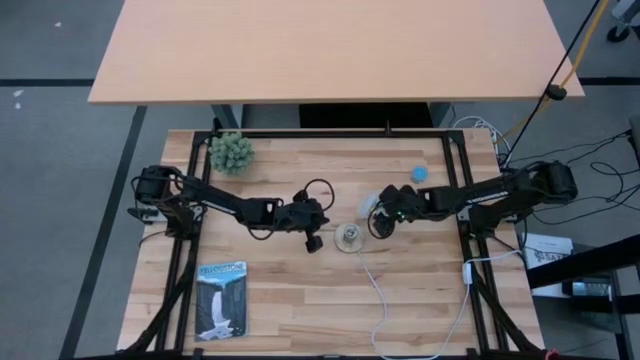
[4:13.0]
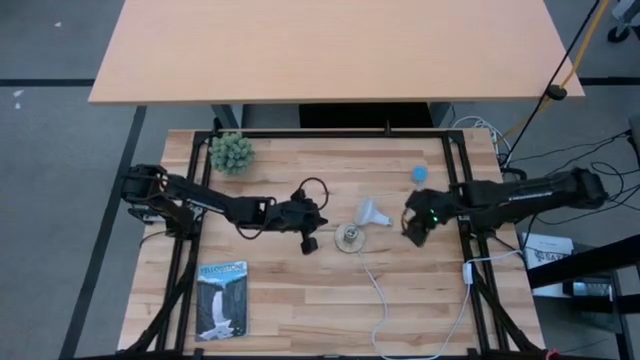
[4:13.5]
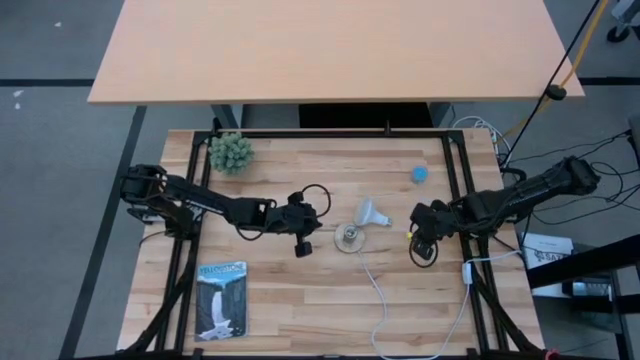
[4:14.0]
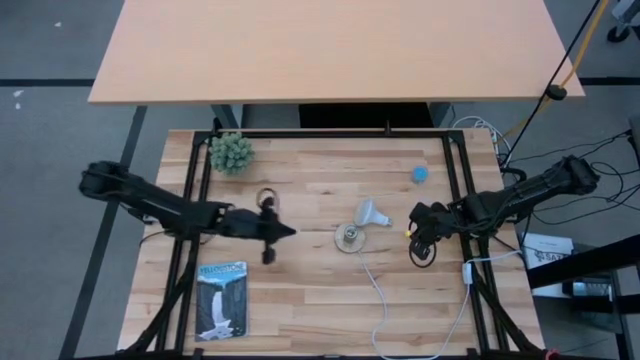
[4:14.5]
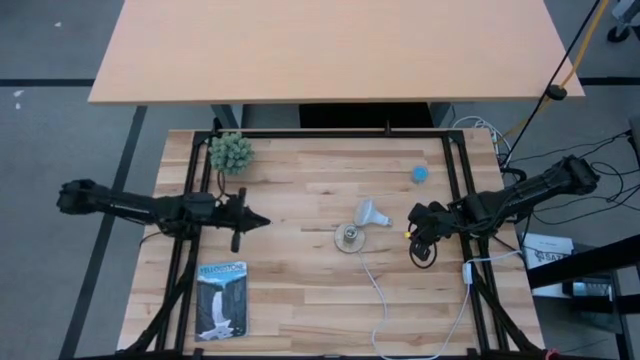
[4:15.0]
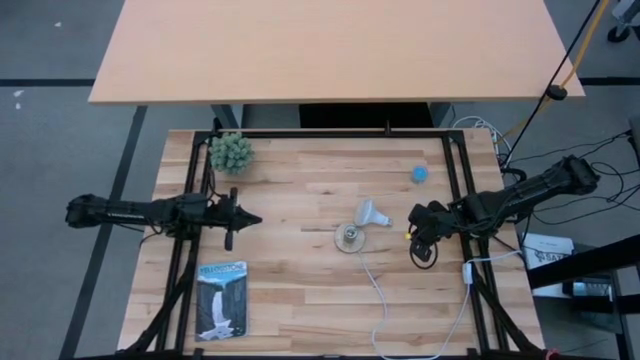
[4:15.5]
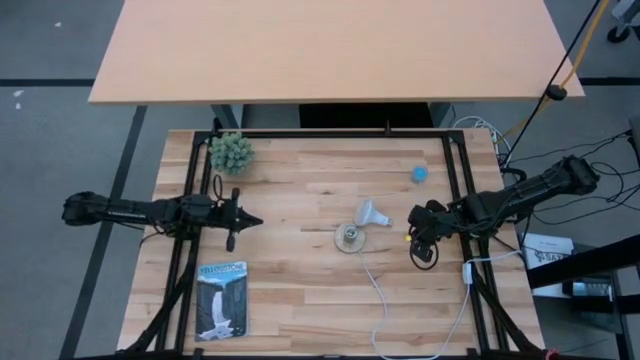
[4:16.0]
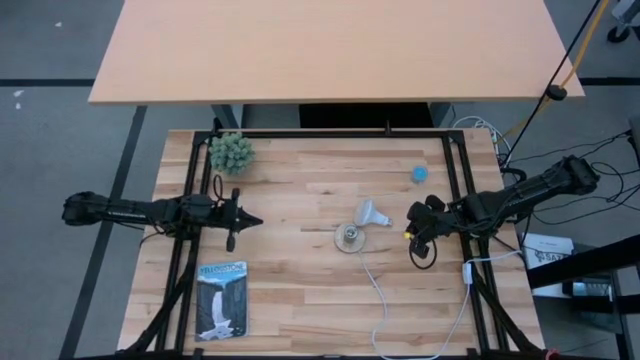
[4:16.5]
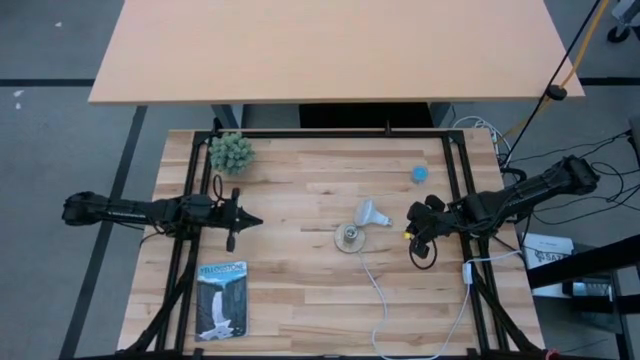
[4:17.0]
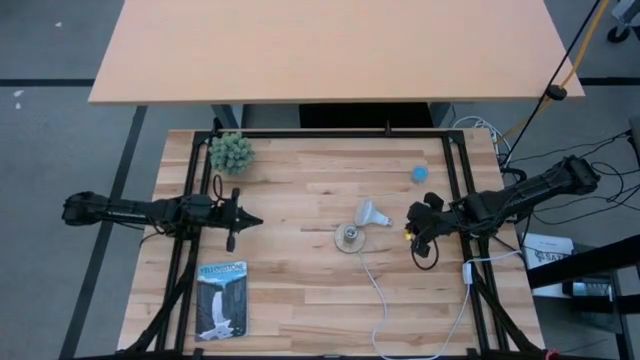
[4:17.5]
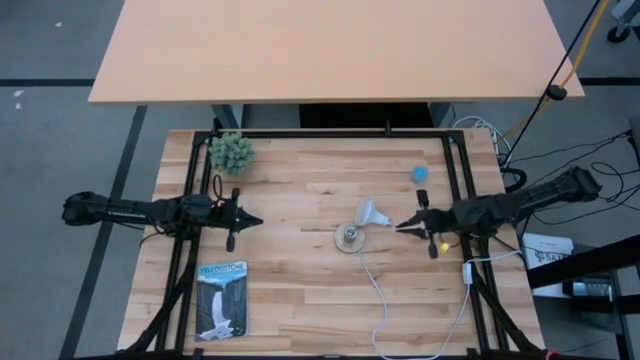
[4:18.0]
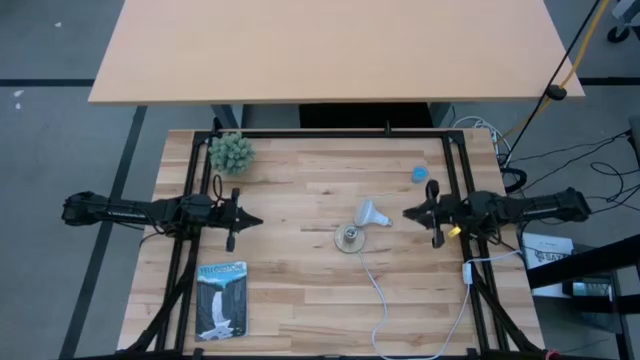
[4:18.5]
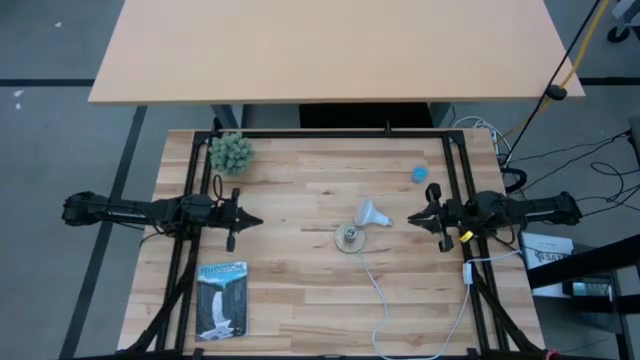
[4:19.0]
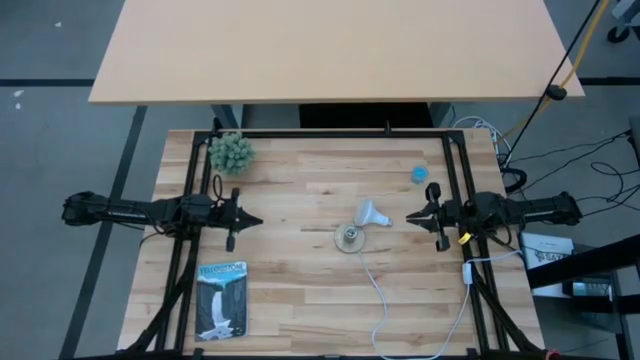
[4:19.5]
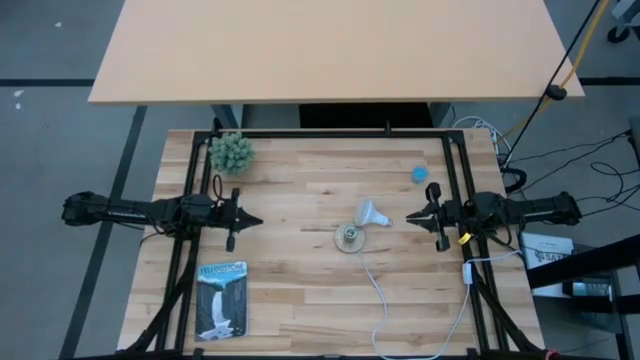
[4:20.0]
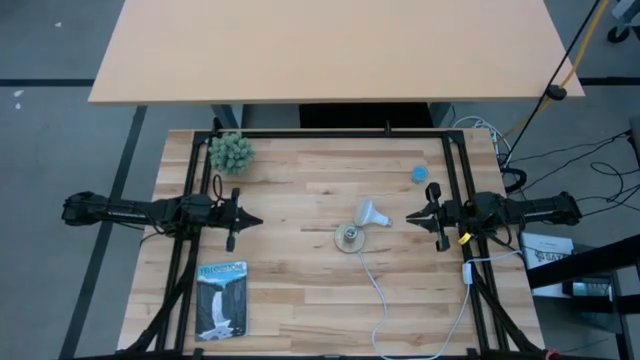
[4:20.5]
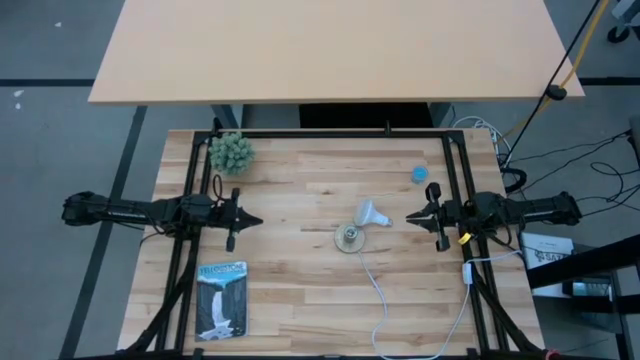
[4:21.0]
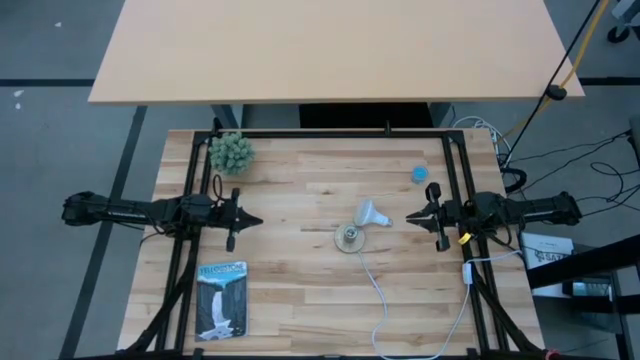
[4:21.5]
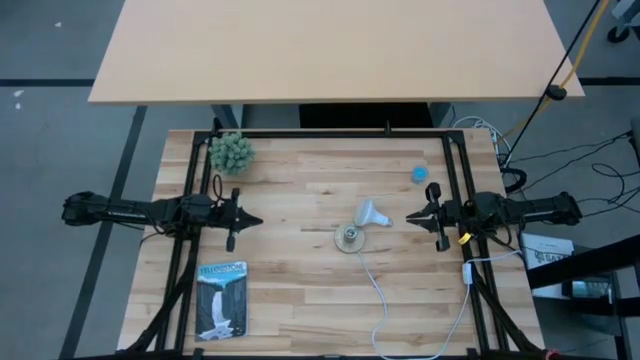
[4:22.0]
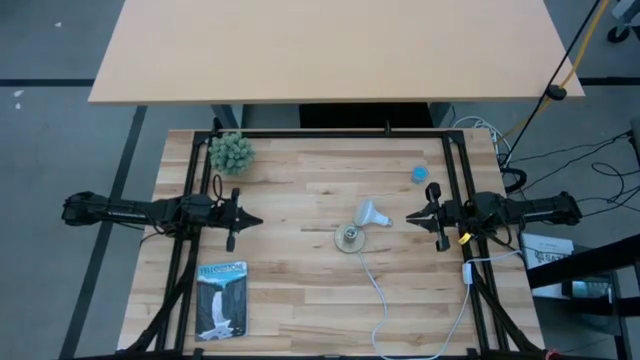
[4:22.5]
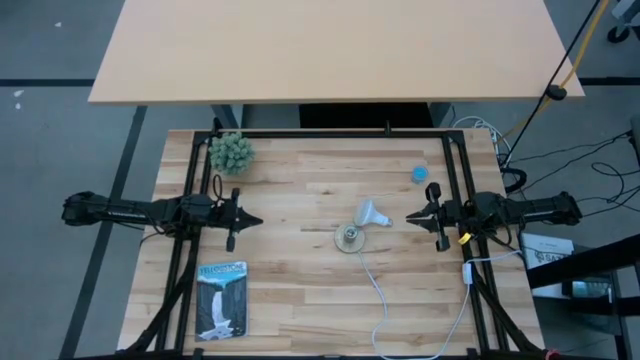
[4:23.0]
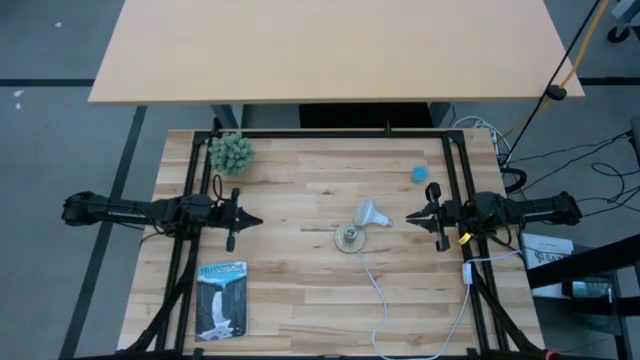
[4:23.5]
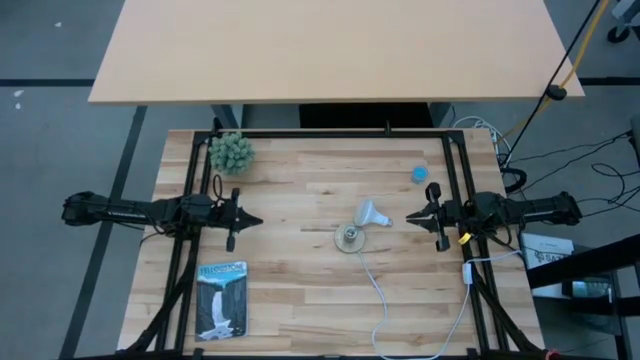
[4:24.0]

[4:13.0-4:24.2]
Task: Screw lightbulb
Return to Home Position

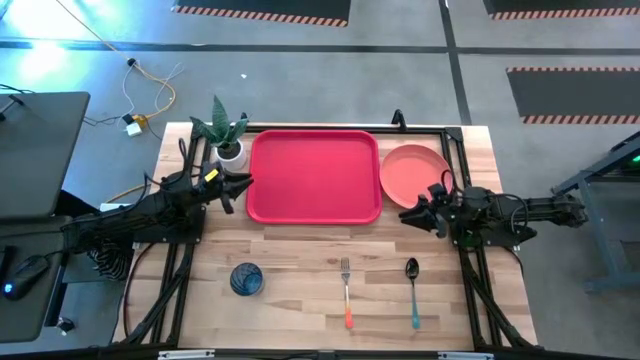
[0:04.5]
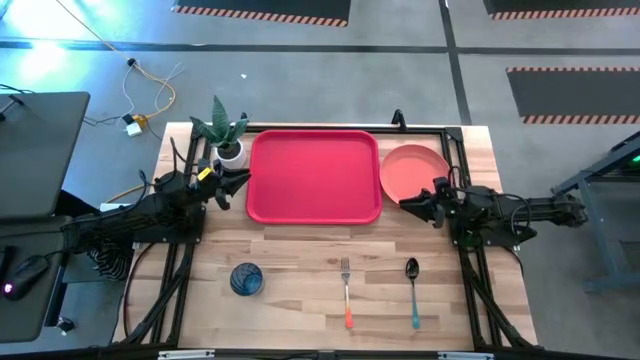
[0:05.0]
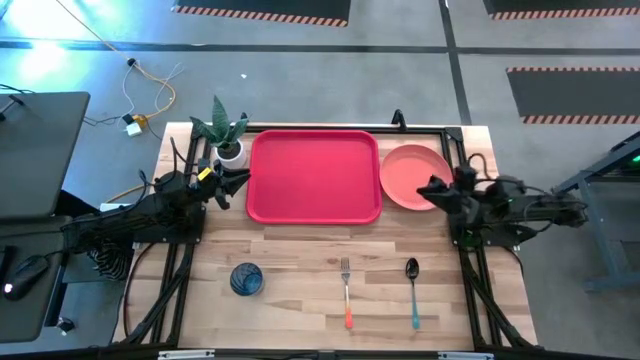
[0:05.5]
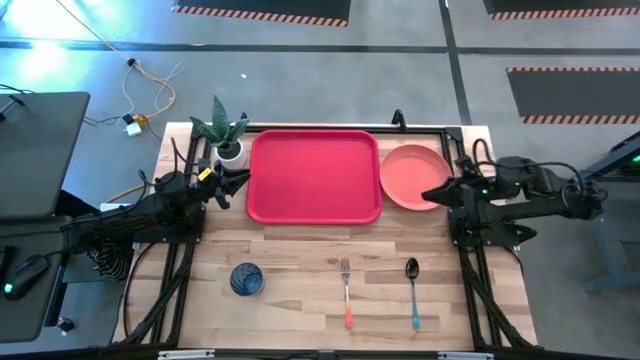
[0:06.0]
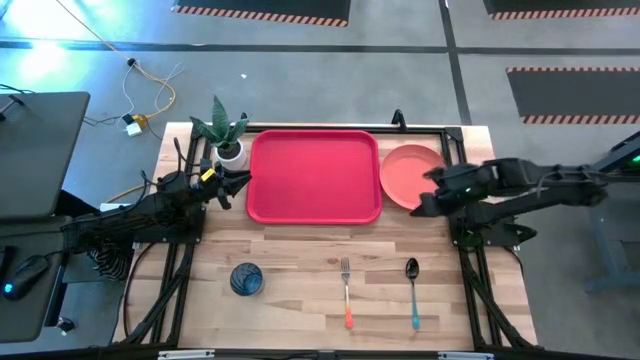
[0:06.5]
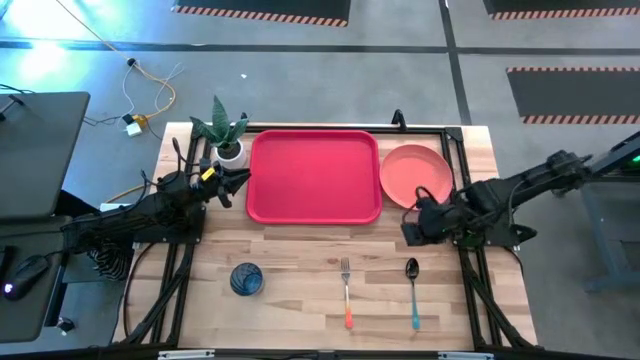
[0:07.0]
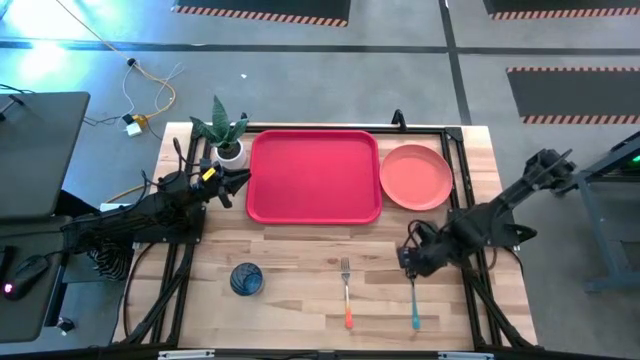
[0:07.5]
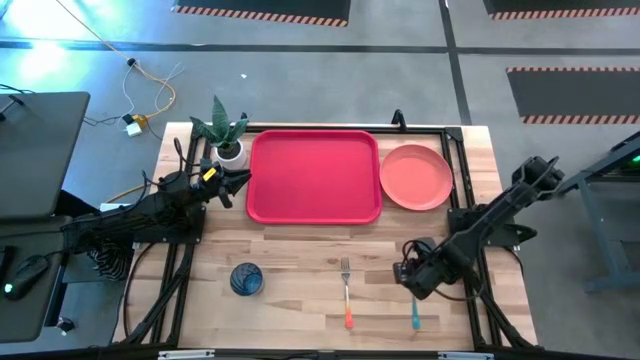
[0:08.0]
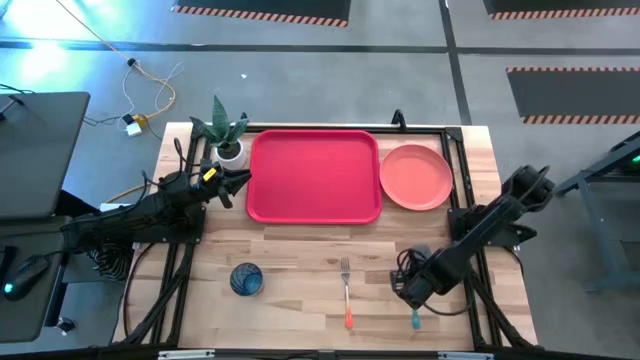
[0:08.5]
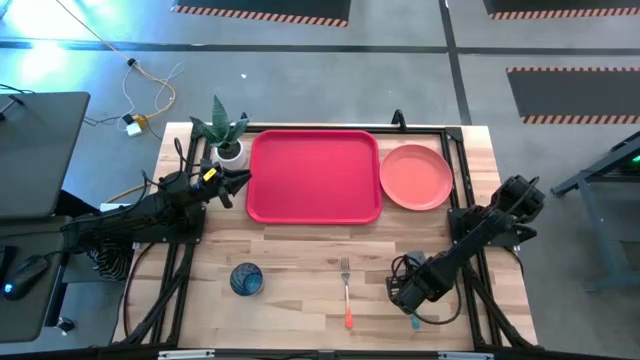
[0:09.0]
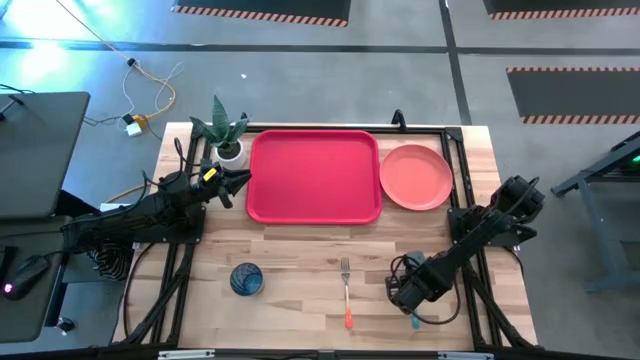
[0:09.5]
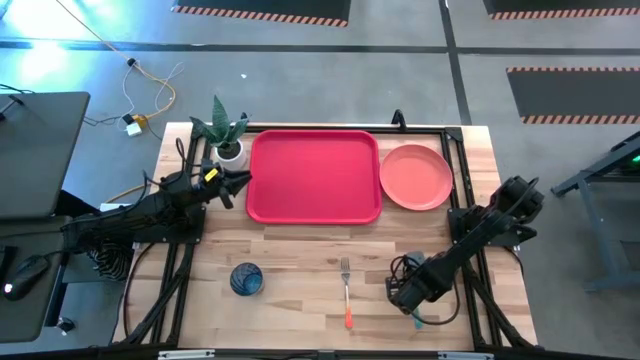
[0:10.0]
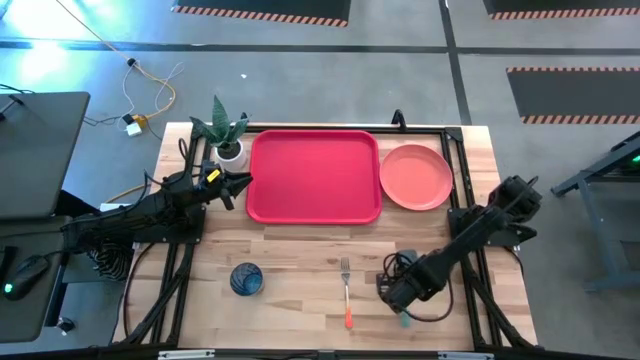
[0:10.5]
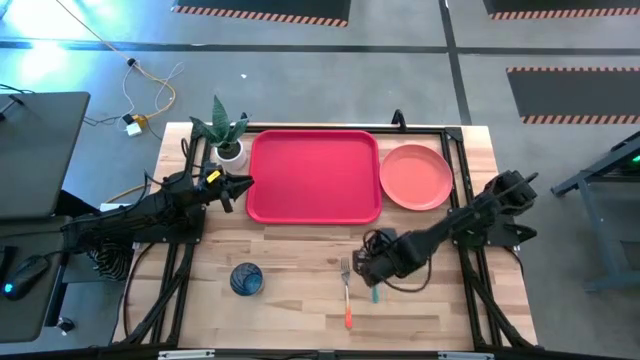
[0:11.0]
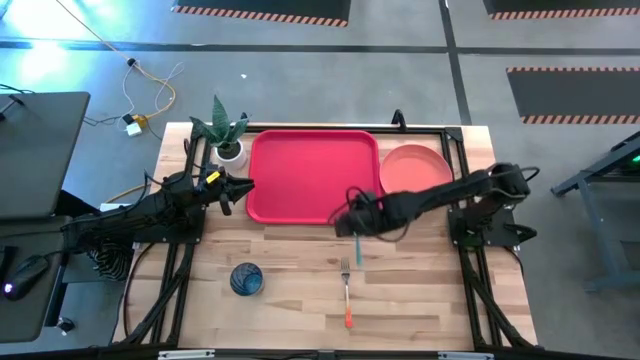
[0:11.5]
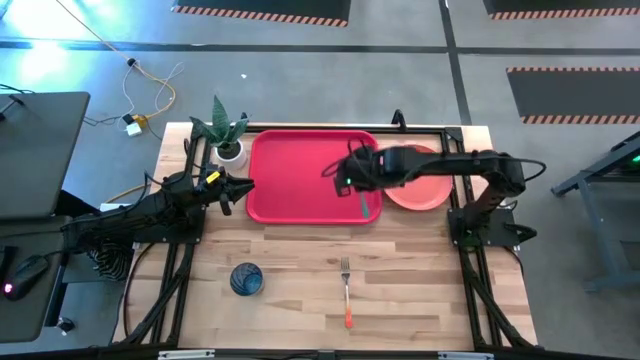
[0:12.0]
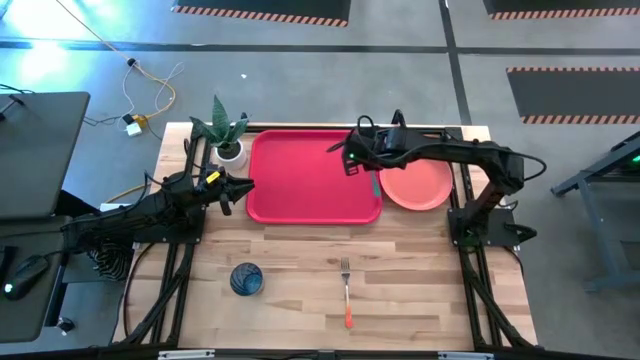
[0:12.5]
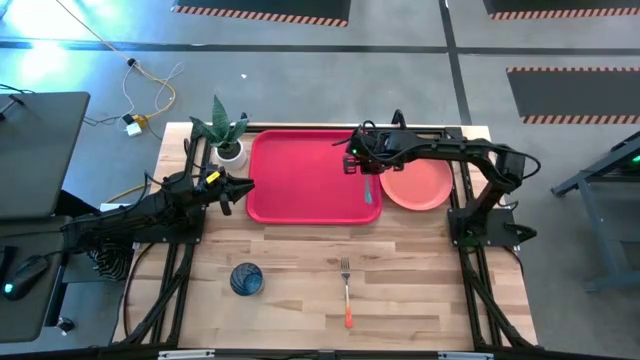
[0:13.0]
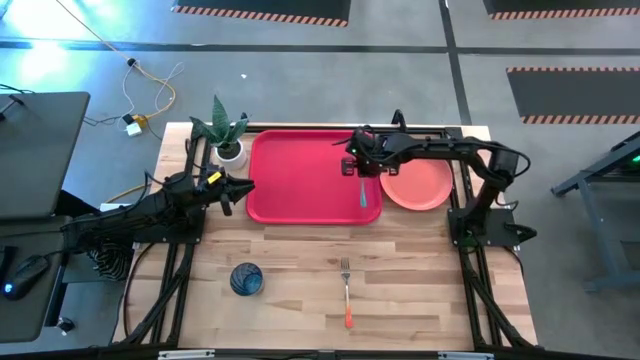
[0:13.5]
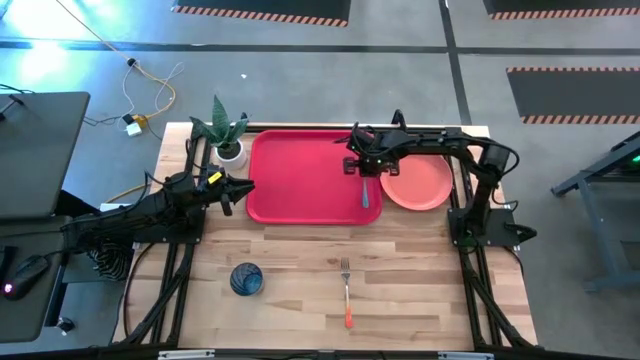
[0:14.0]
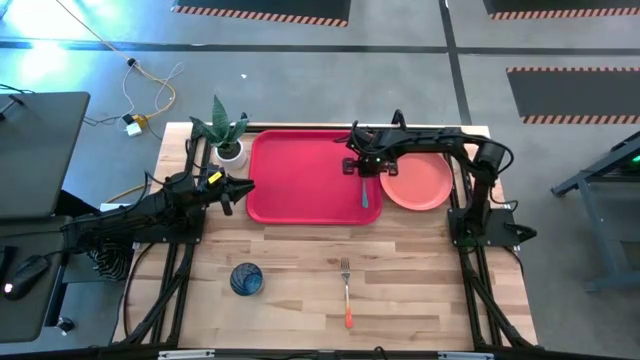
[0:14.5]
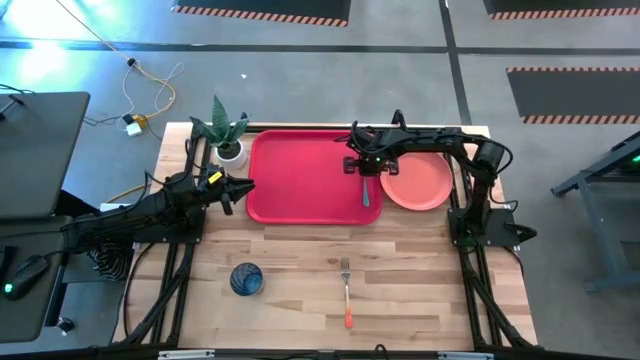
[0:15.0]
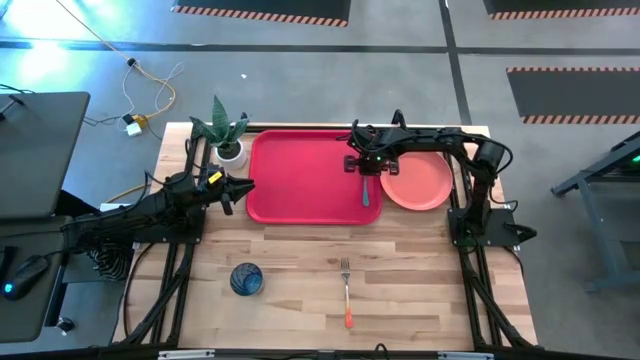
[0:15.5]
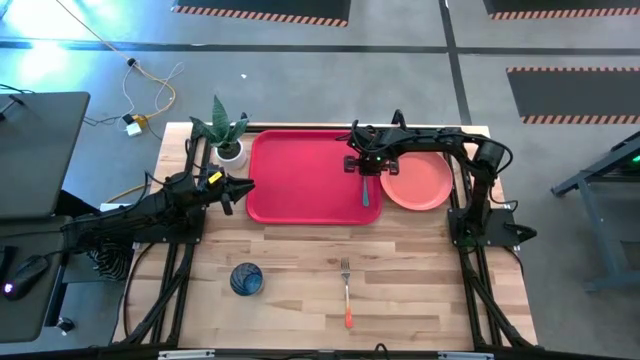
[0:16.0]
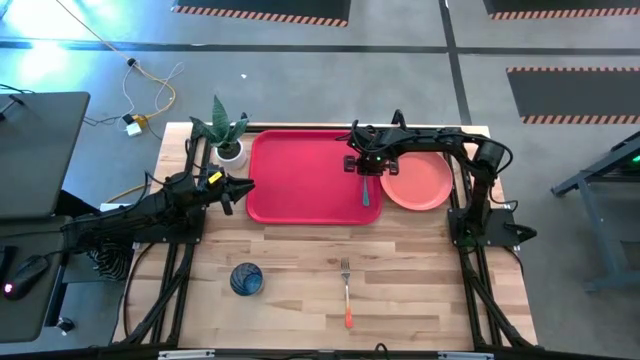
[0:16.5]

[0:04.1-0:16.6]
Task: Pick and place plate/cup/fork/spoon on tray
Put the blue spoon on the right side of red serving tray
